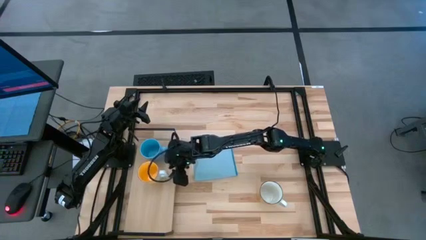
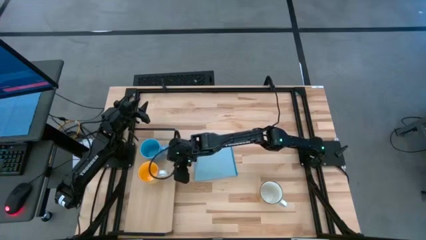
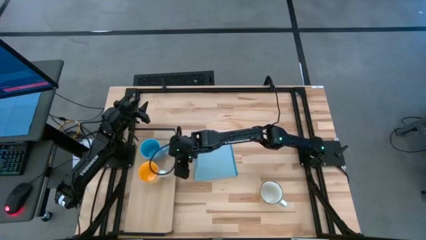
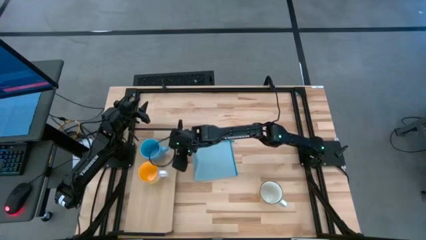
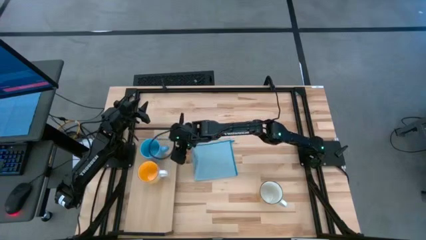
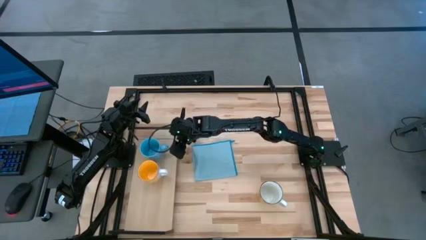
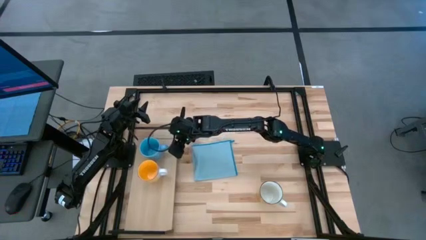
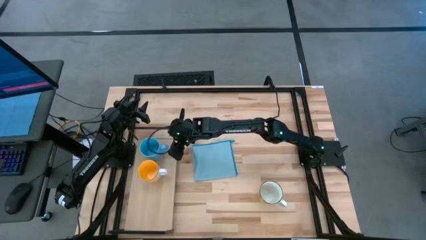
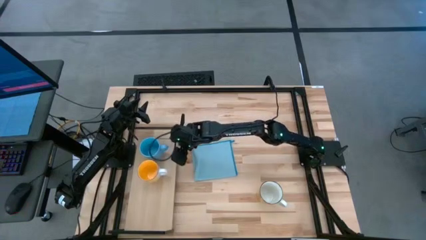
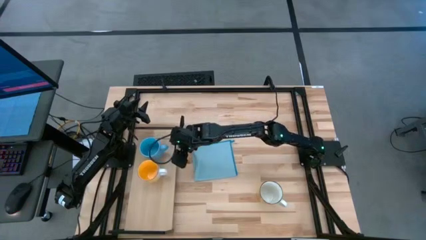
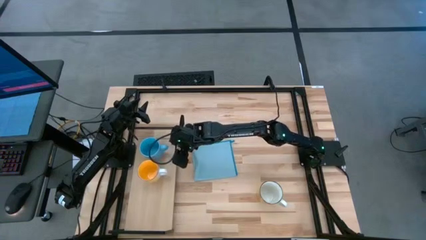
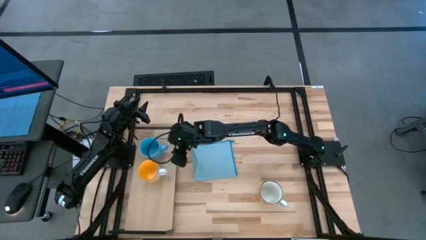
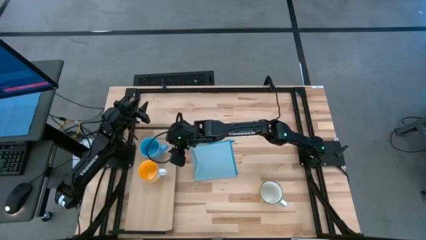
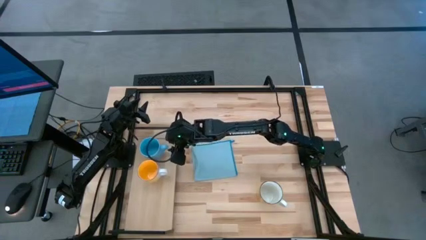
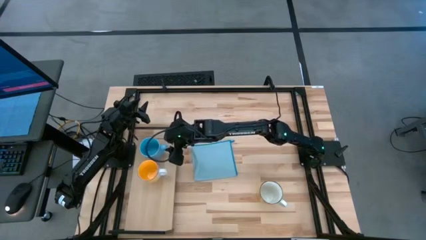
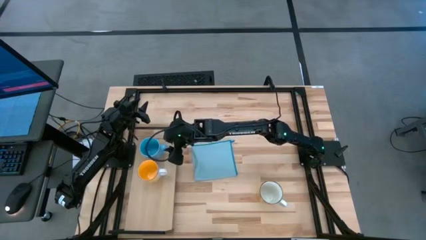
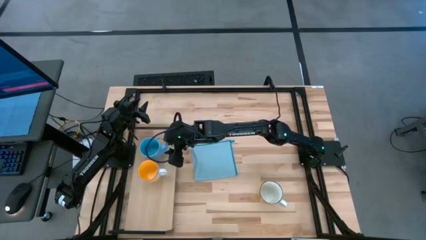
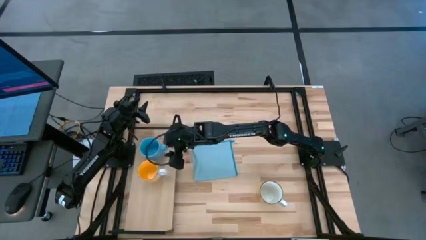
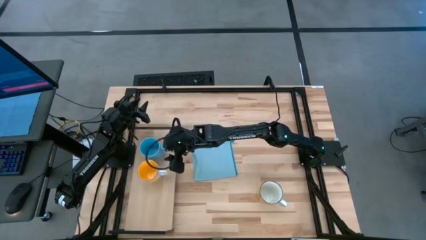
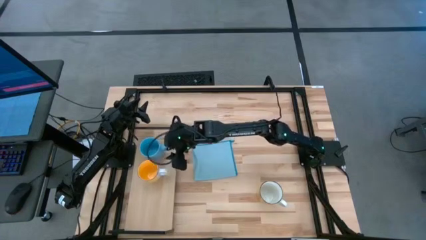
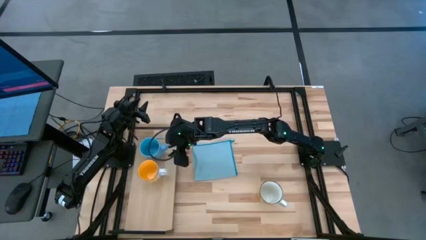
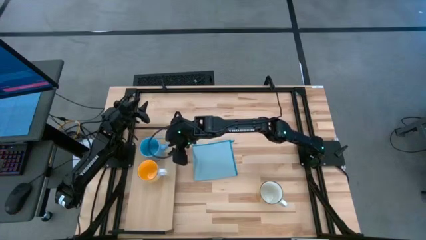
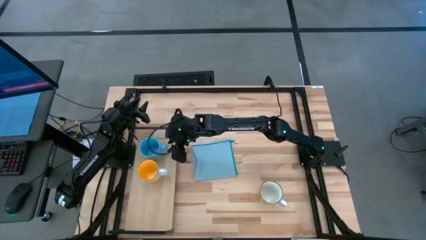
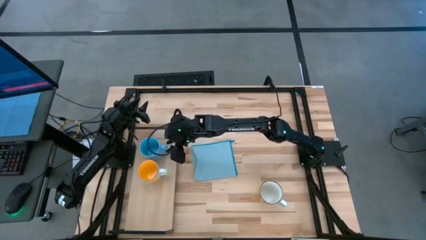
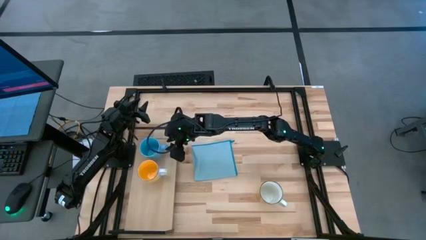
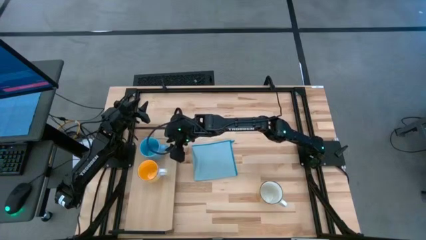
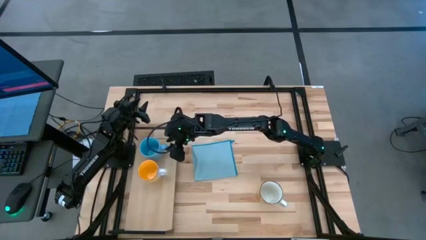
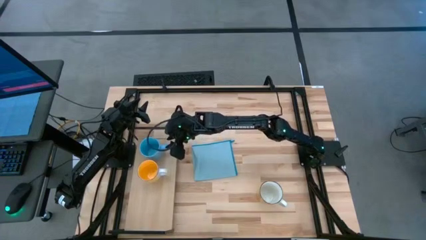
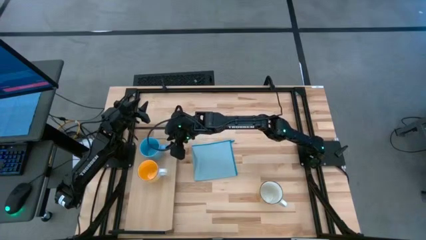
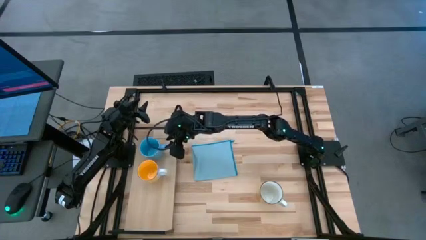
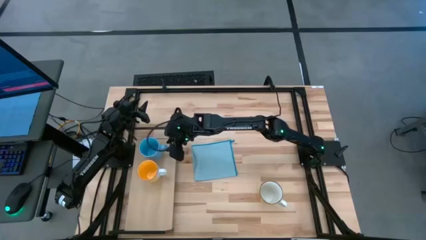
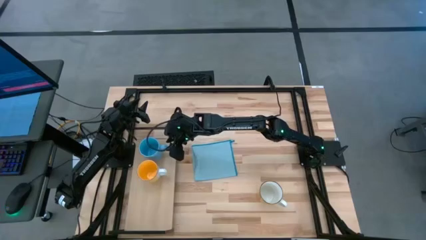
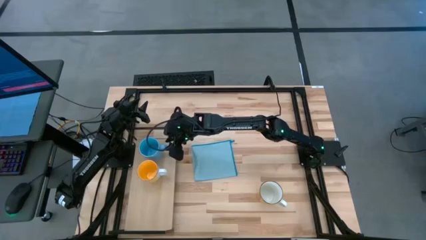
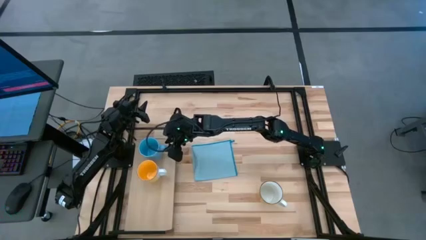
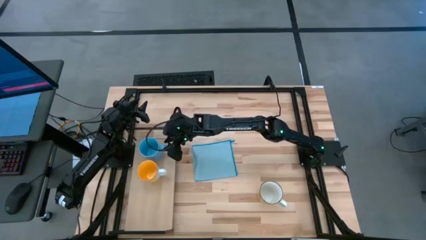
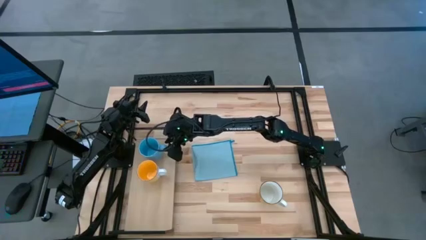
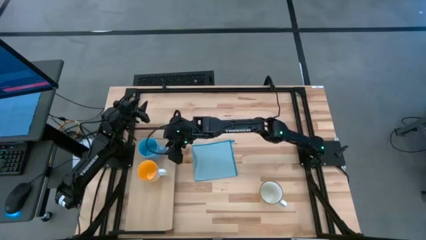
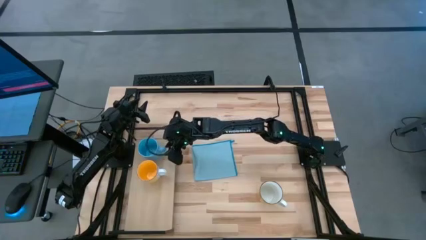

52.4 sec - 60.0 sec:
Task: Stack small to large cups/mugs on shelf
Adjust the blue mug on the shelf

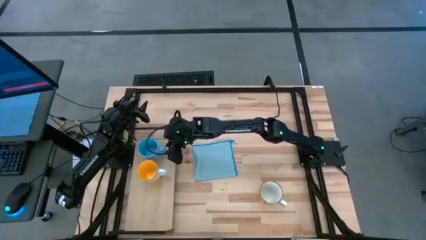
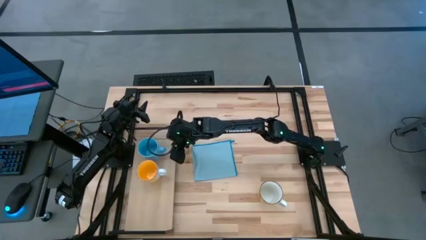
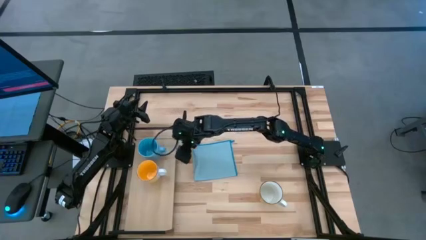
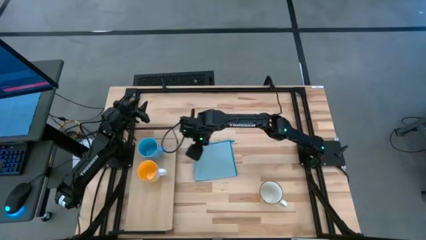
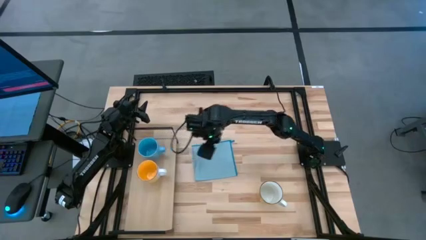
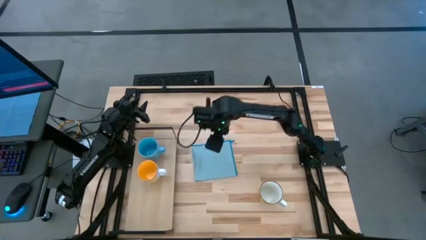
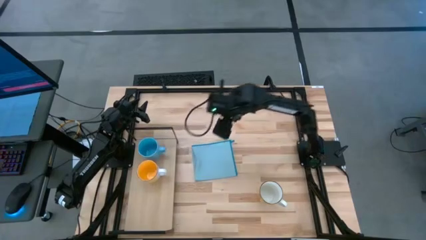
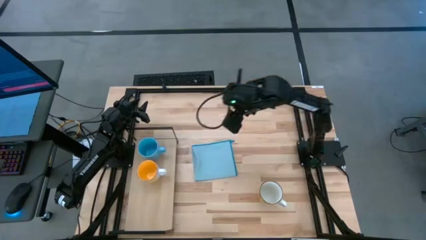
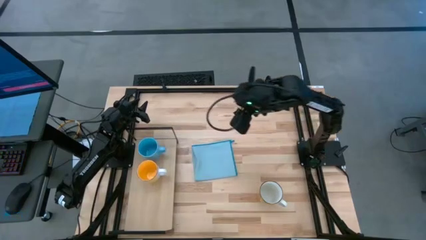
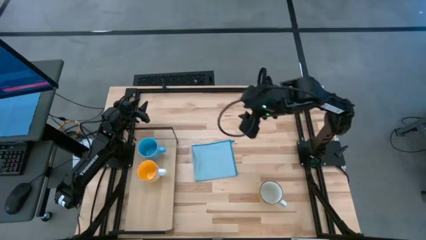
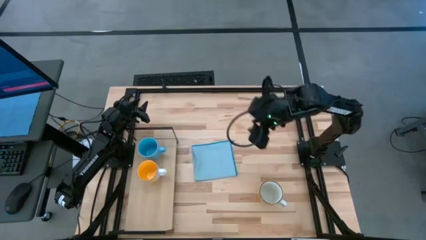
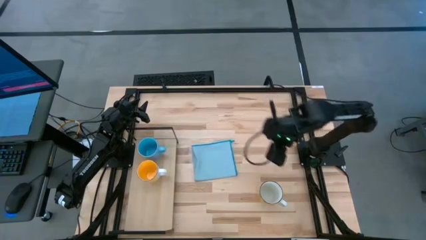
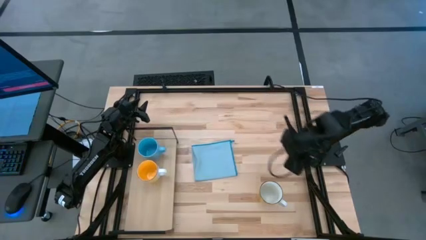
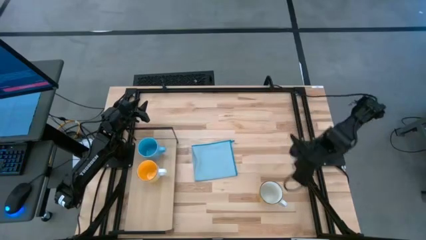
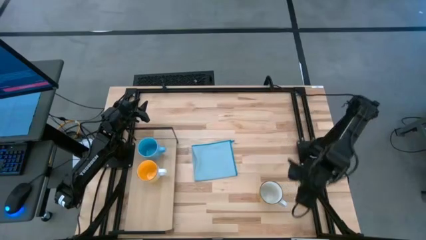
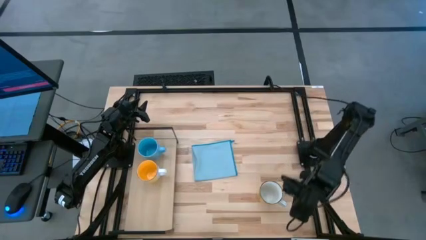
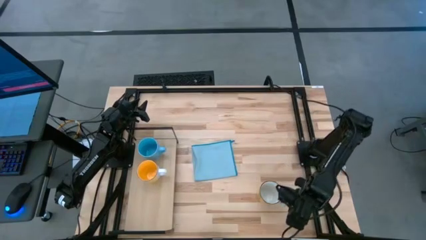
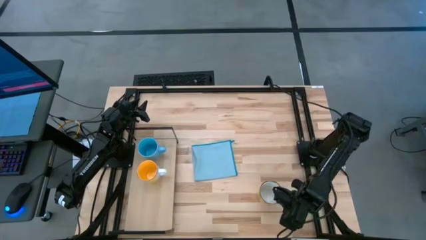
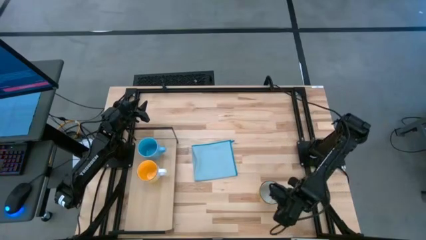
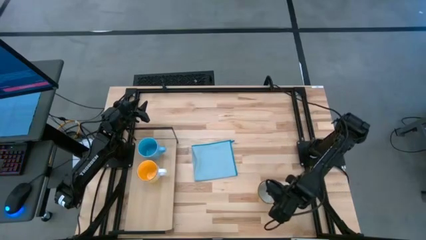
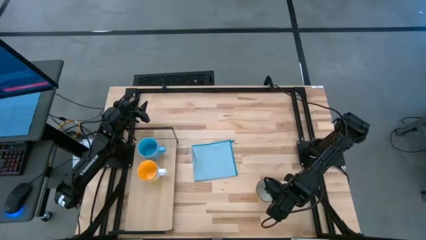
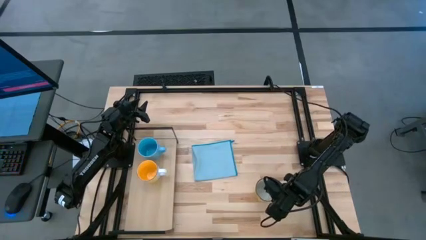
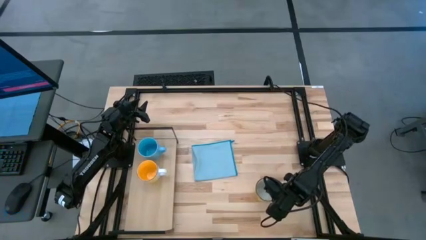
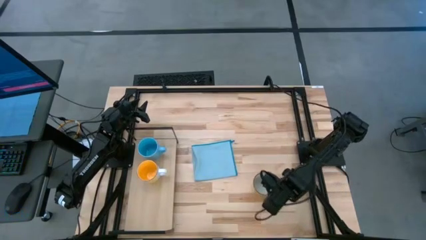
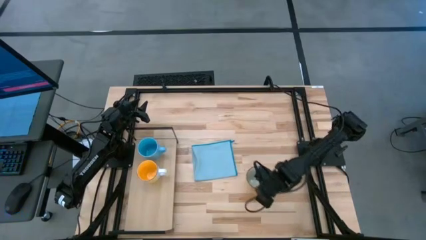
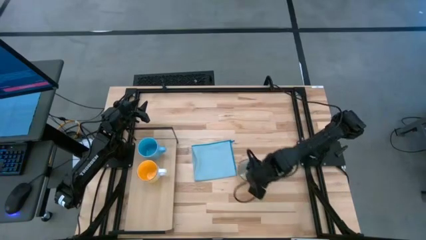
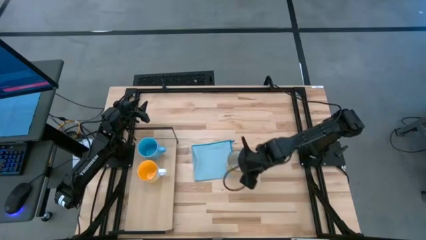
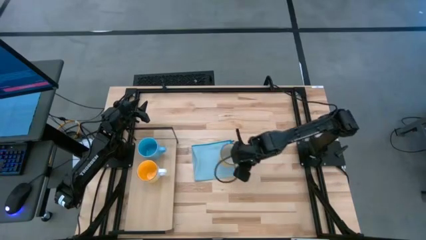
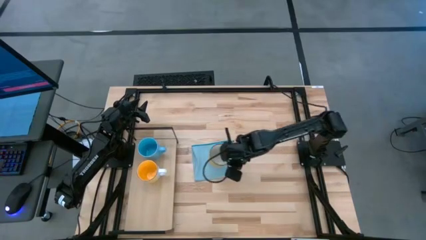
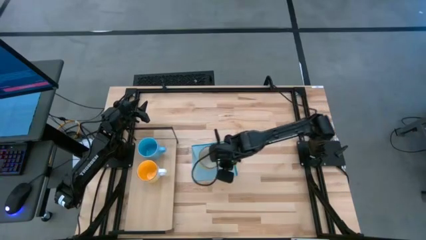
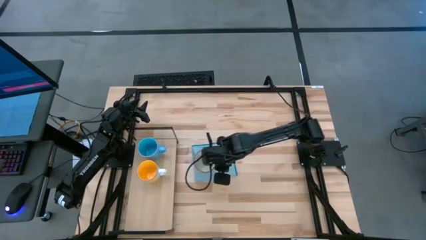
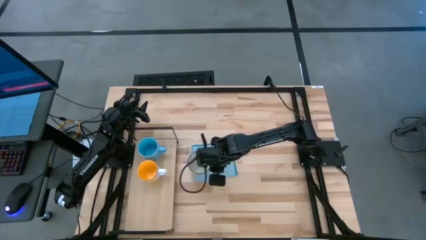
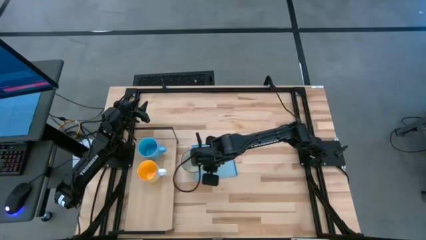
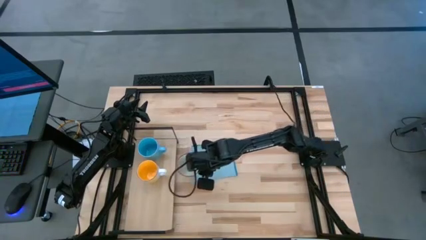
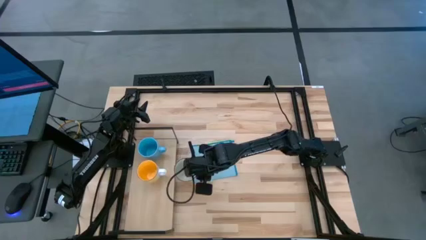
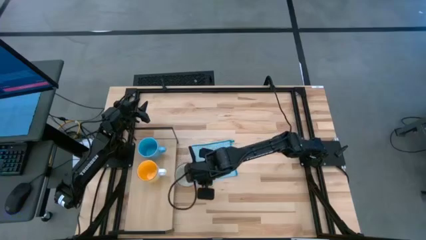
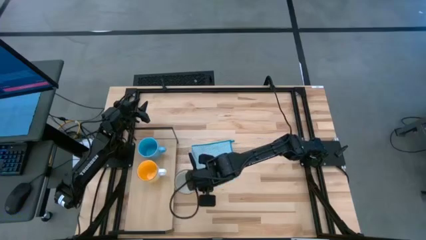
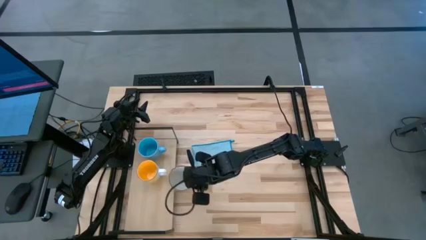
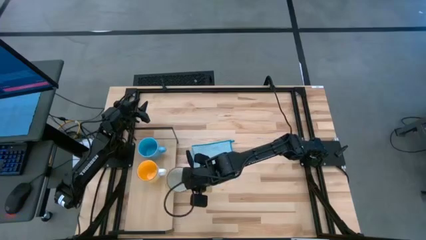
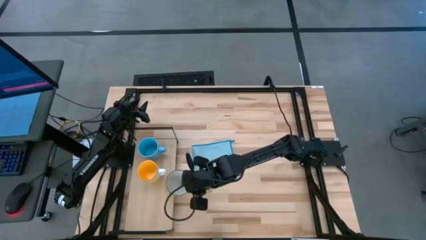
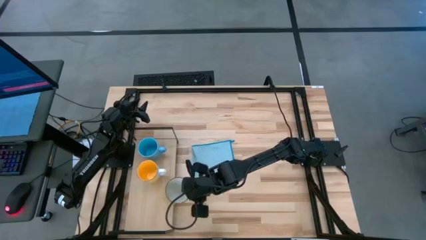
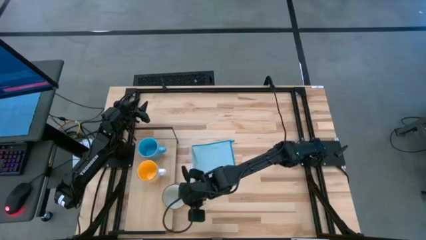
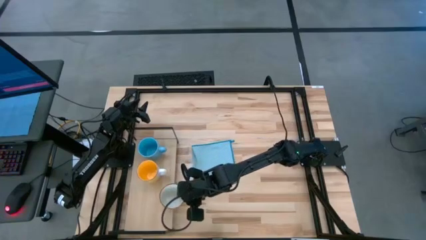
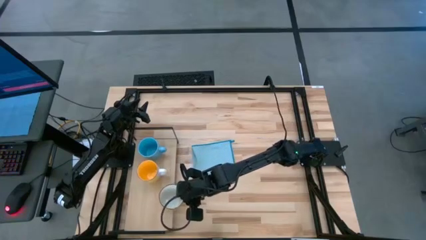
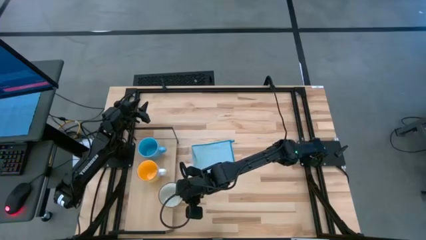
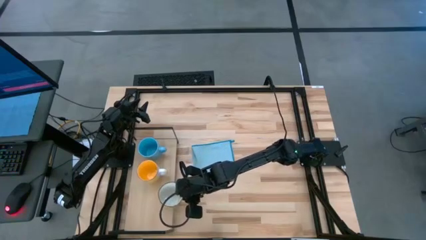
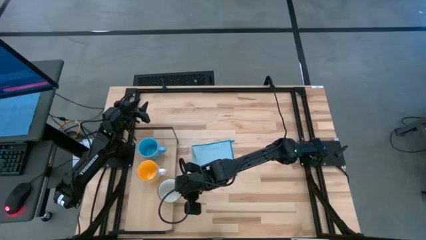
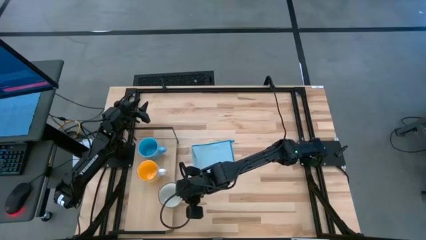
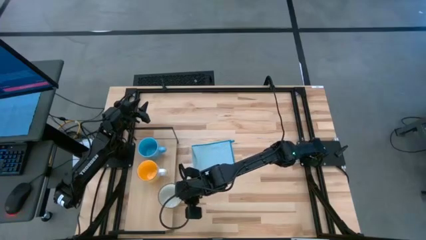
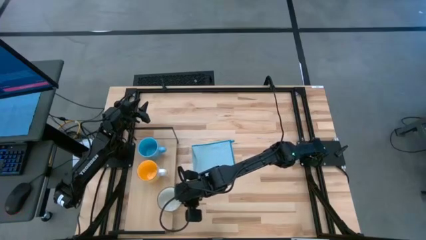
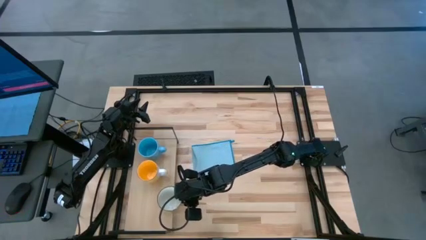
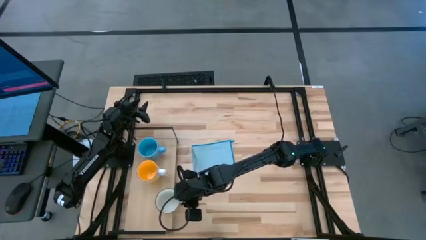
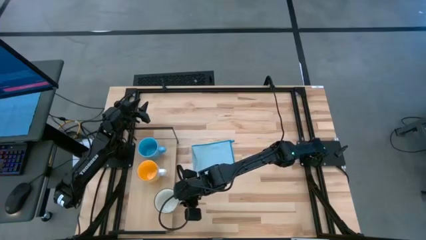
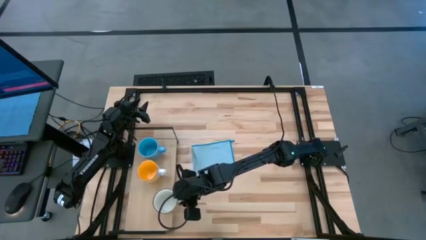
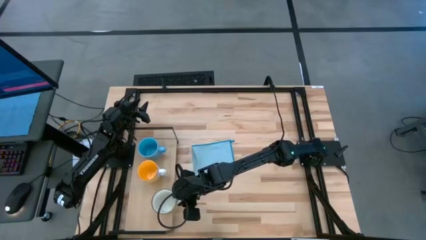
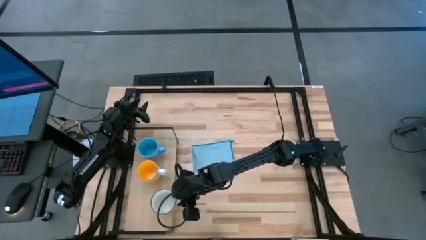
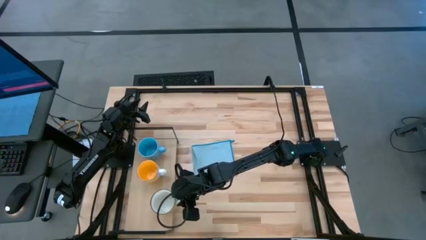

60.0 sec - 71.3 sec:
Put the white and yellow mug on the shelf
